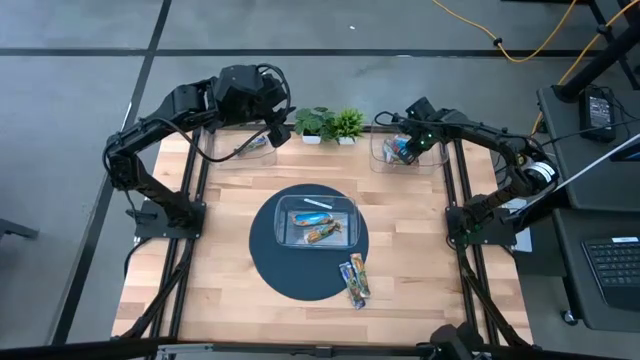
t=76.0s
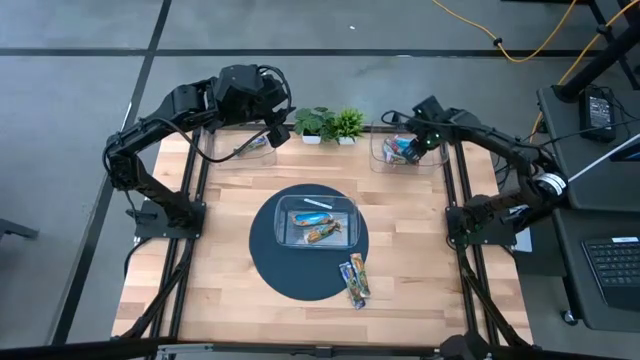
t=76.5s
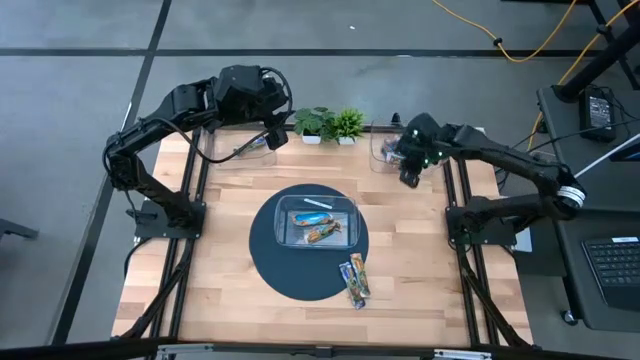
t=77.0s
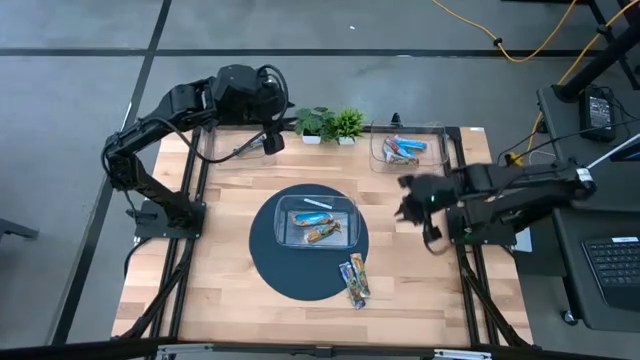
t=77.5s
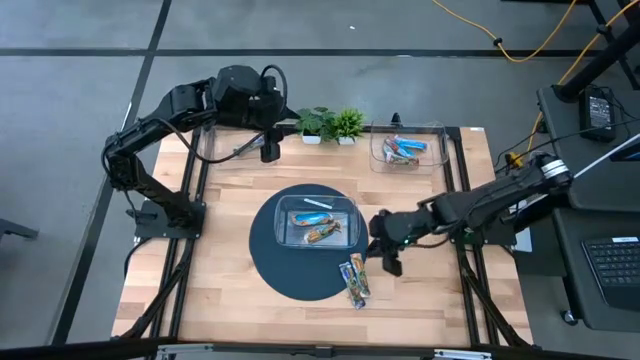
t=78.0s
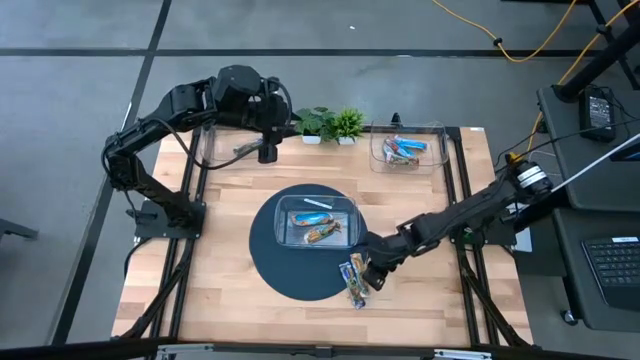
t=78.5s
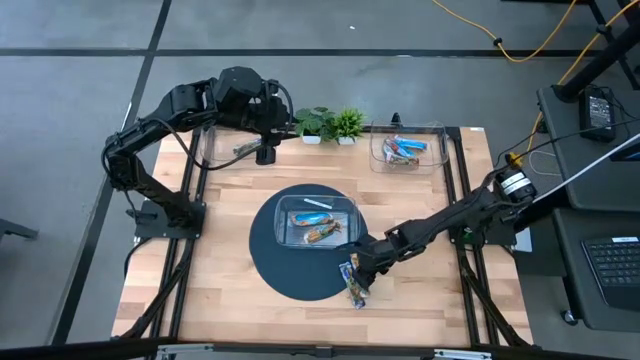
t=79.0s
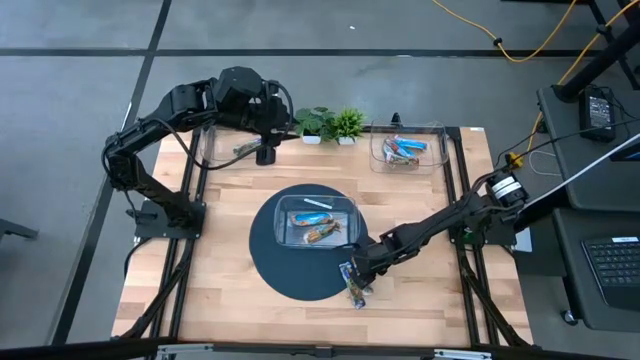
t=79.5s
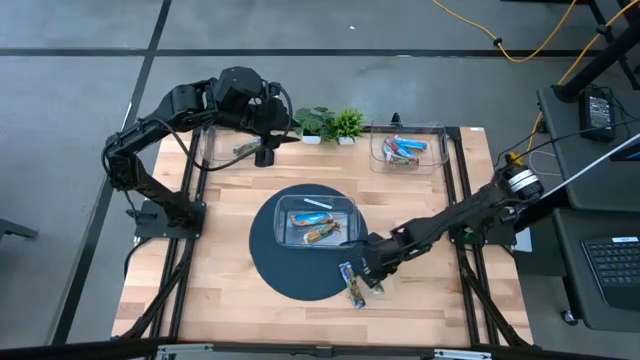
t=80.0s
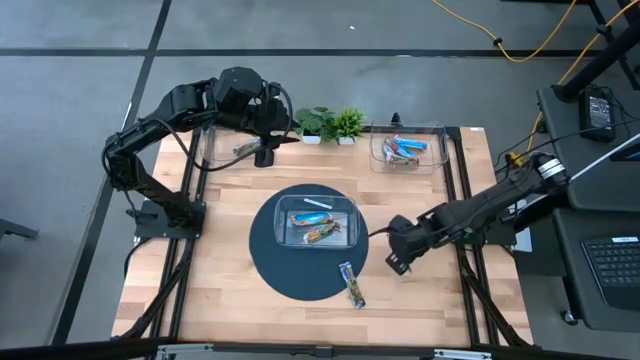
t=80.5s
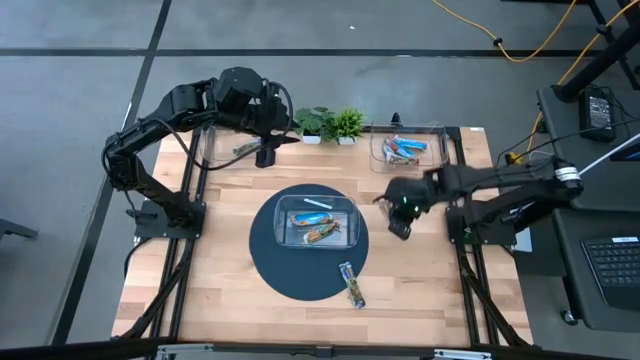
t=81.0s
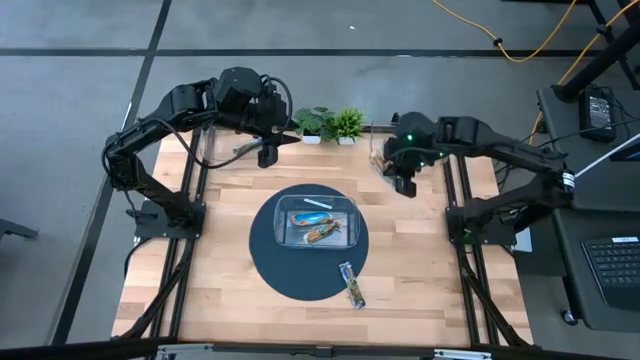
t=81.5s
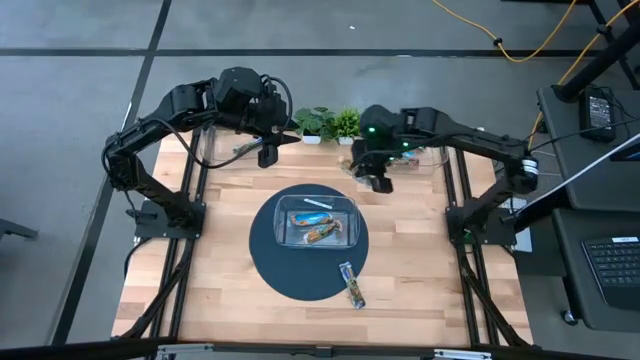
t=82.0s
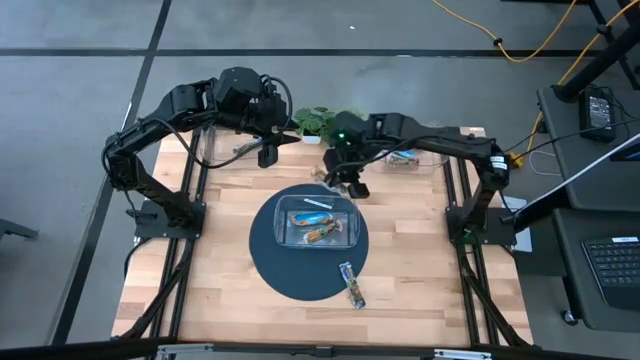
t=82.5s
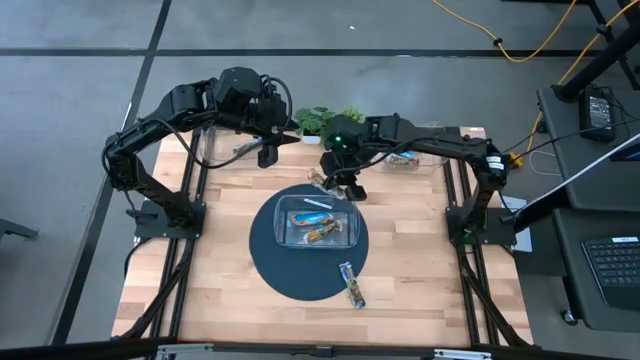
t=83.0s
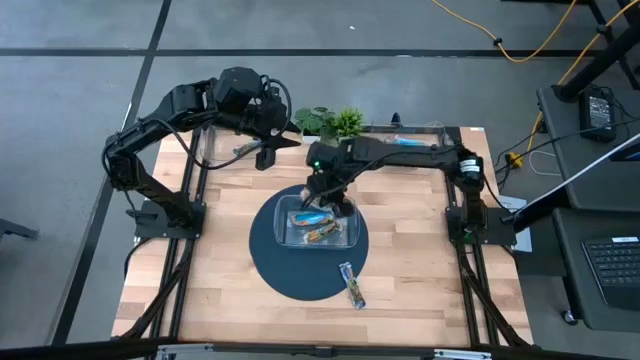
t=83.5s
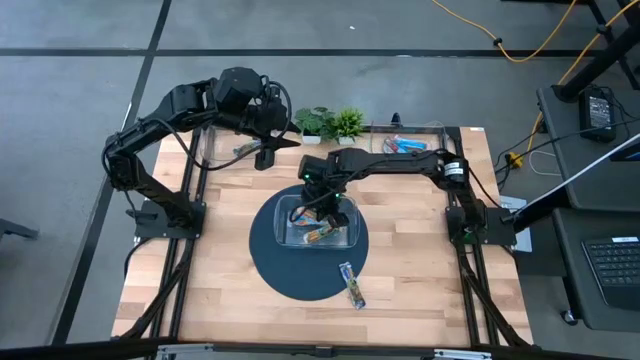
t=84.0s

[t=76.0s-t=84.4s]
Task: Pick and place Granola Bars by type
Put the yellow granola bar into the bottom transparent bin

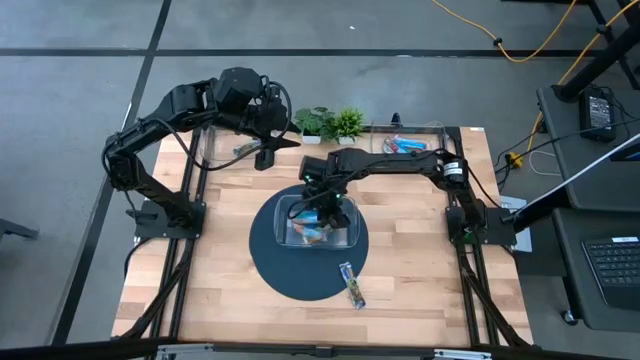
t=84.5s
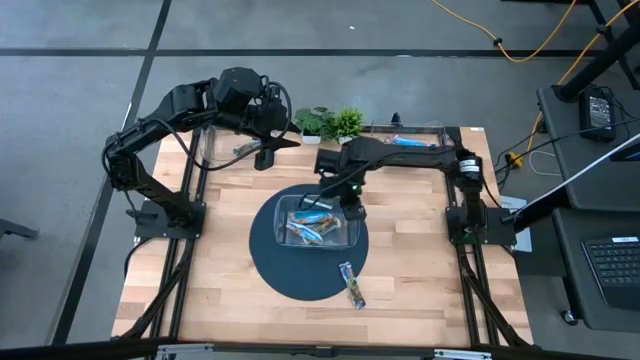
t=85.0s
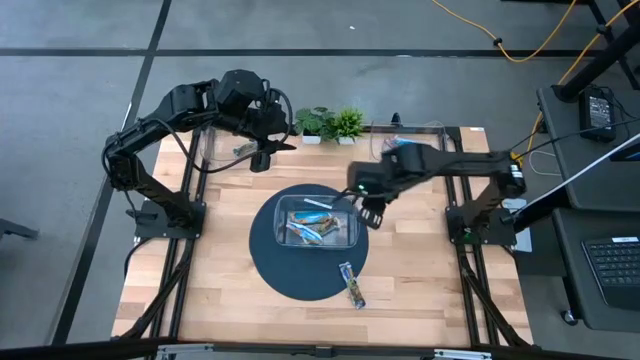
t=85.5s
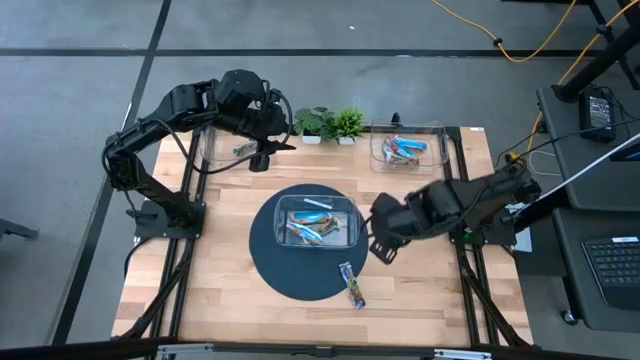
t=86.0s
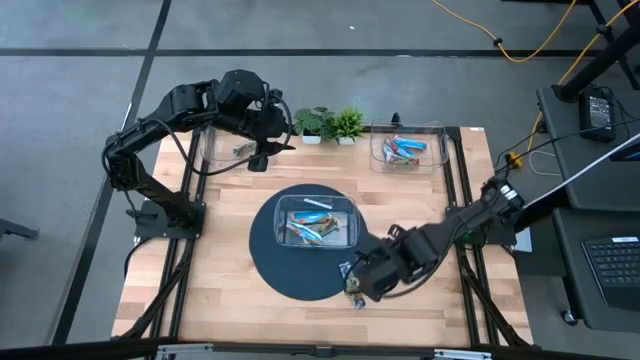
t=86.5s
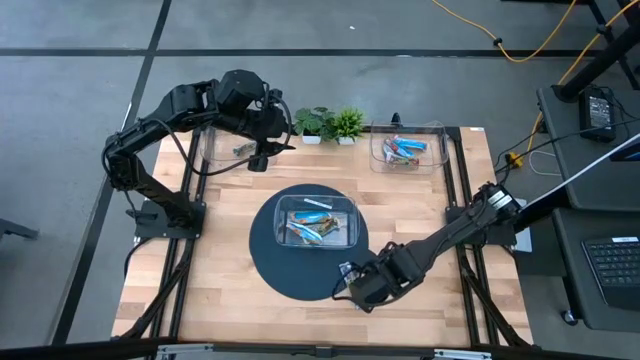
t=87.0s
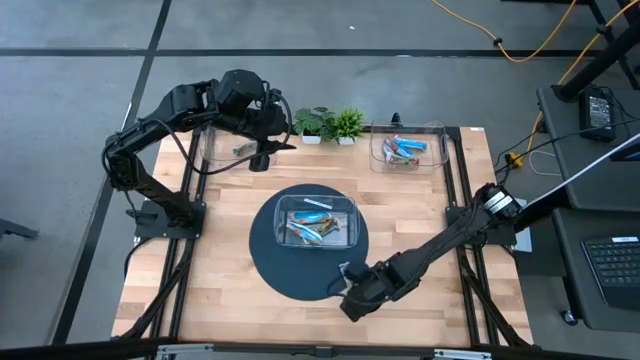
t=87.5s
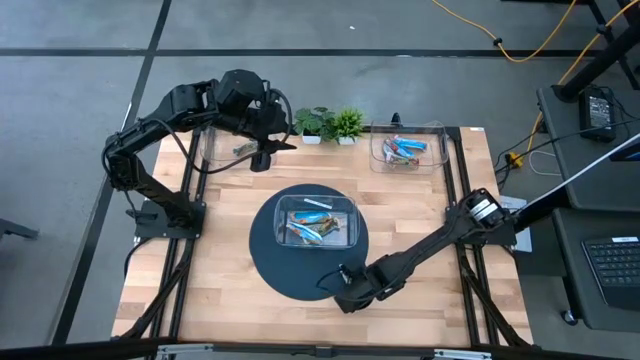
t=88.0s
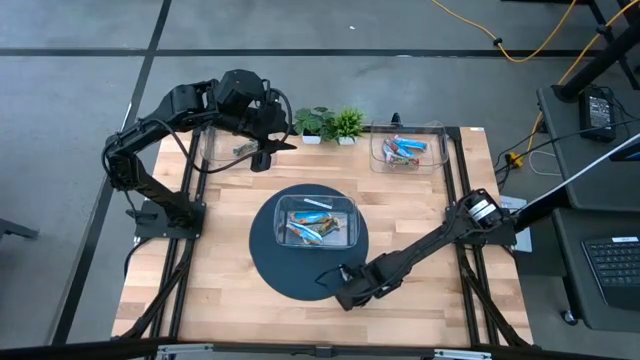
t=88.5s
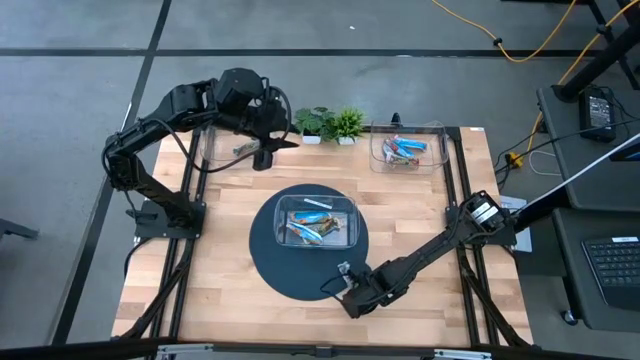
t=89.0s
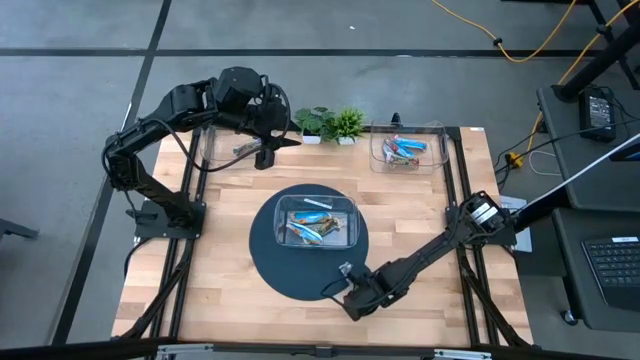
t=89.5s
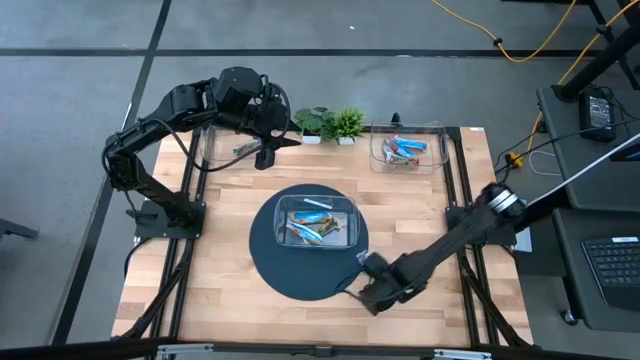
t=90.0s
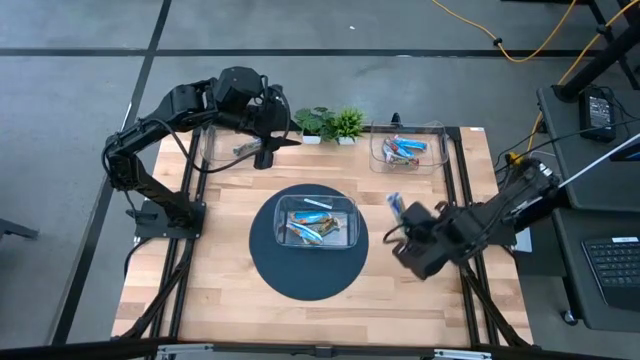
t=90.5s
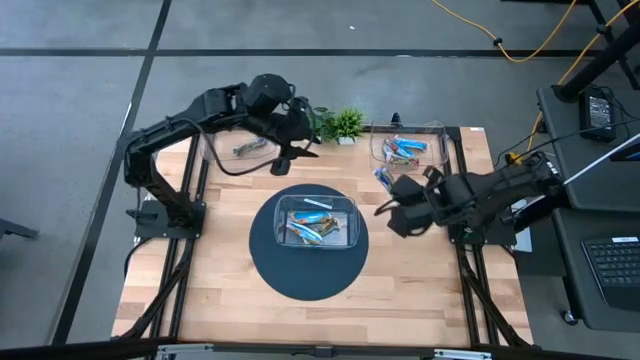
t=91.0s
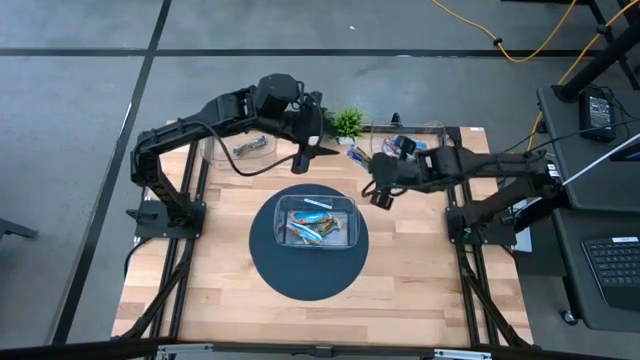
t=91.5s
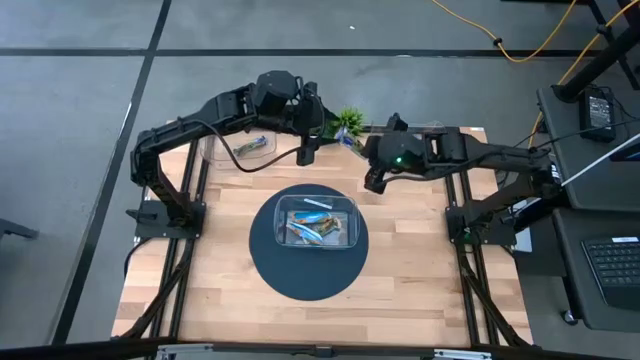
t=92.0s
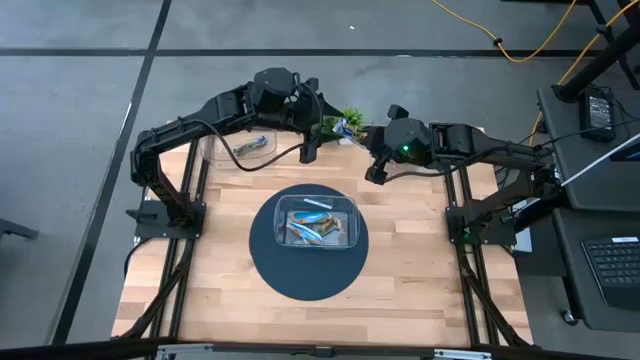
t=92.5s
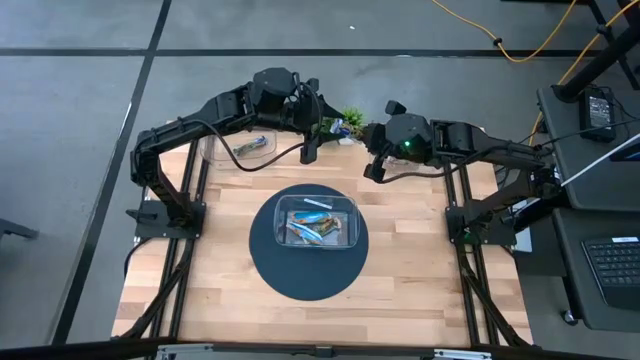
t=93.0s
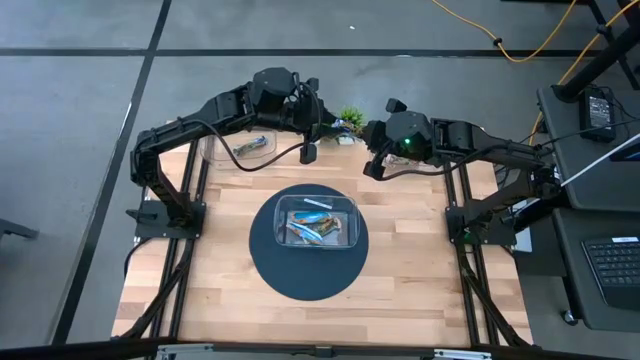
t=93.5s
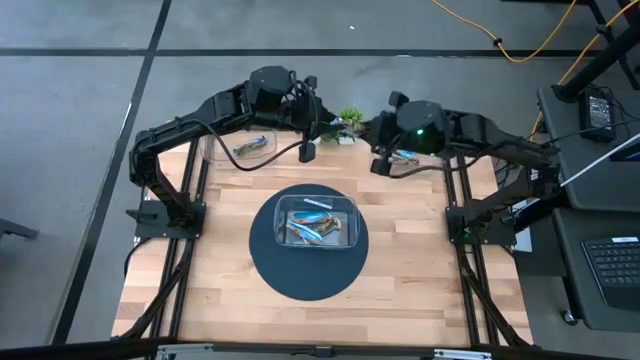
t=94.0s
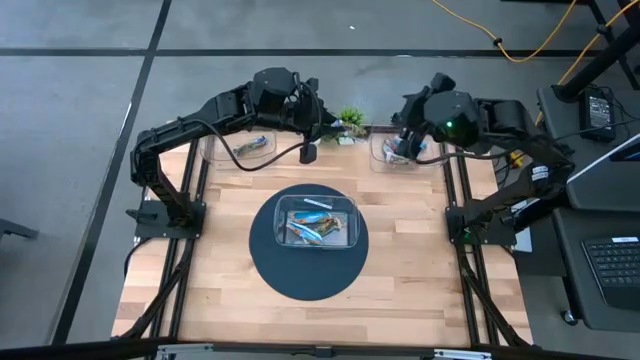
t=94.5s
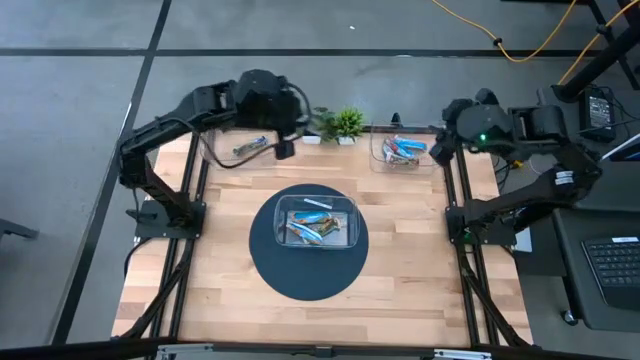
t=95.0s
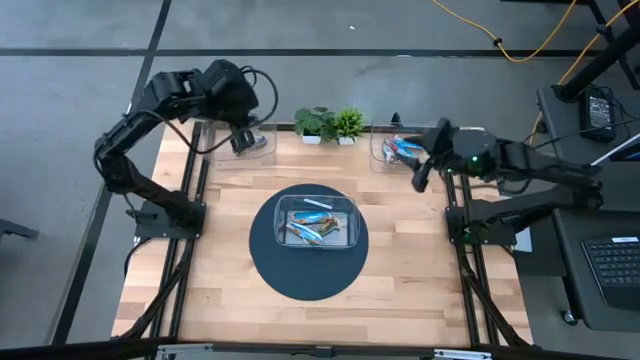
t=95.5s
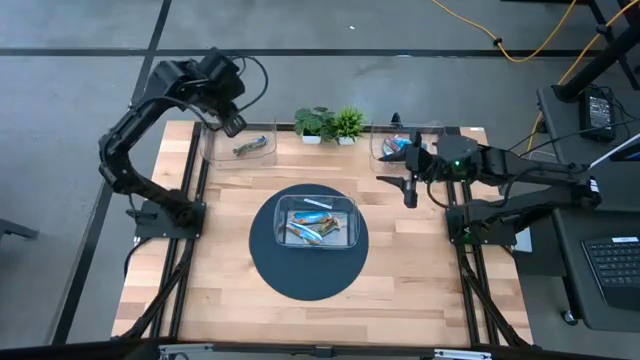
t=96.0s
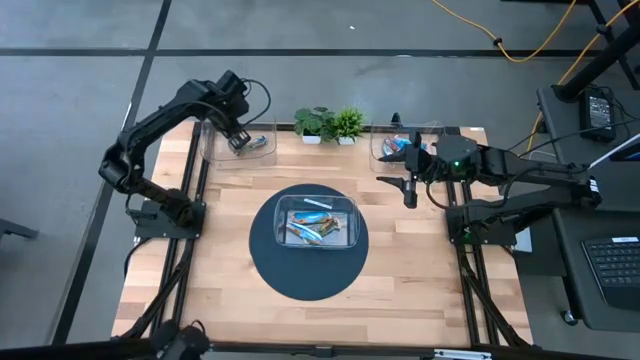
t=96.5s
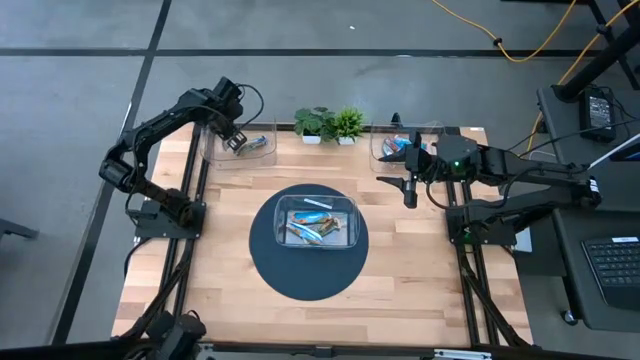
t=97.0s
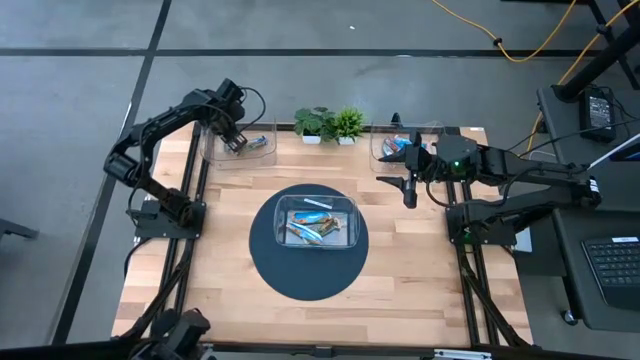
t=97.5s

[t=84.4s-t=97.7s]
Put the blue granola bar into the top left transparent bin
